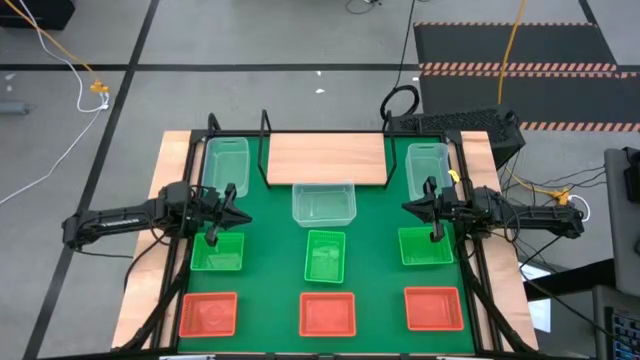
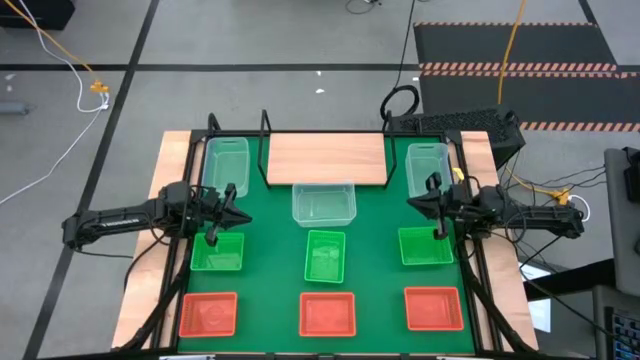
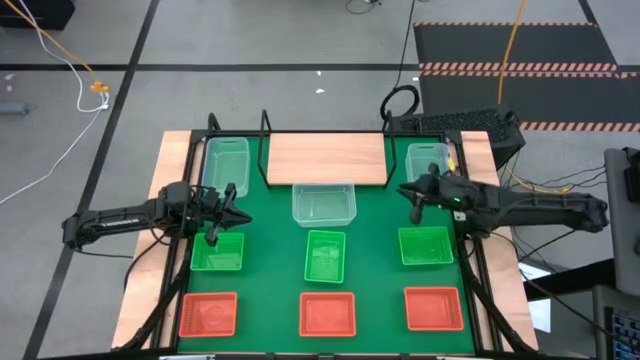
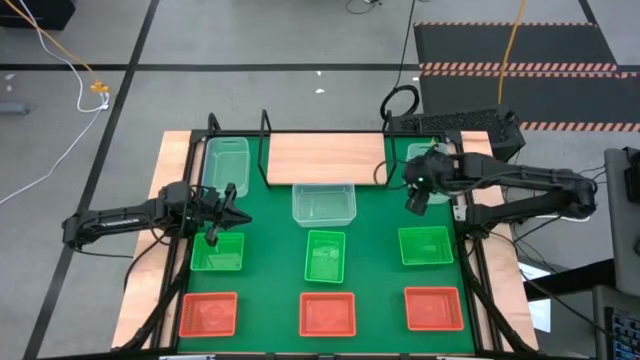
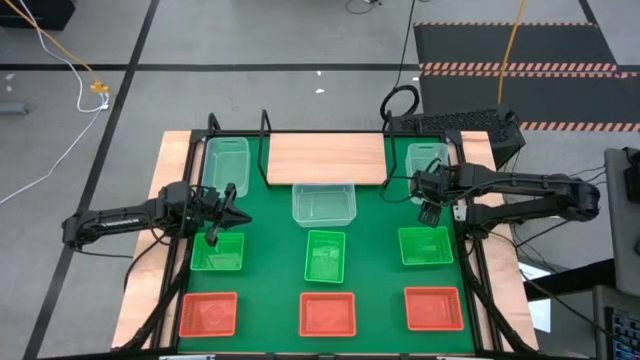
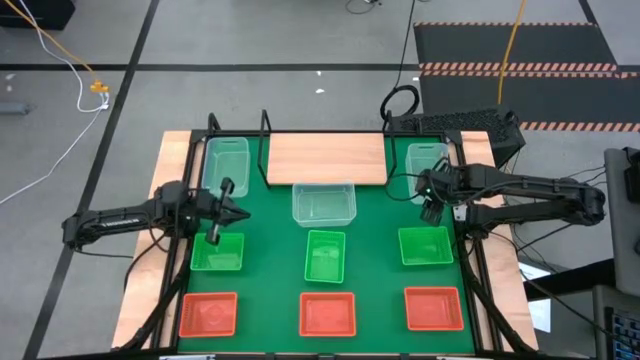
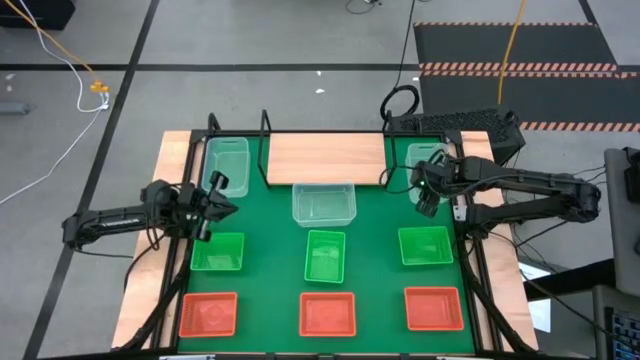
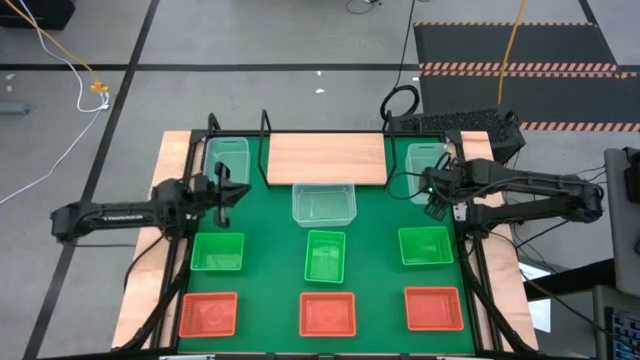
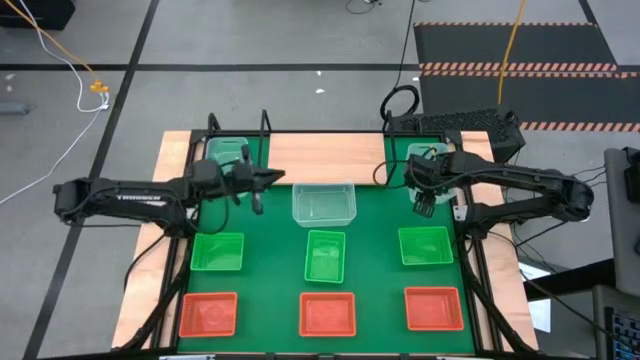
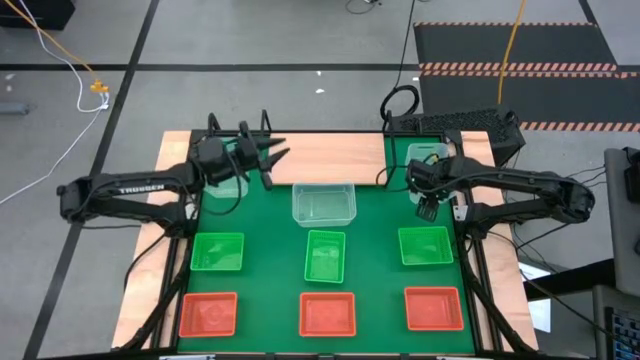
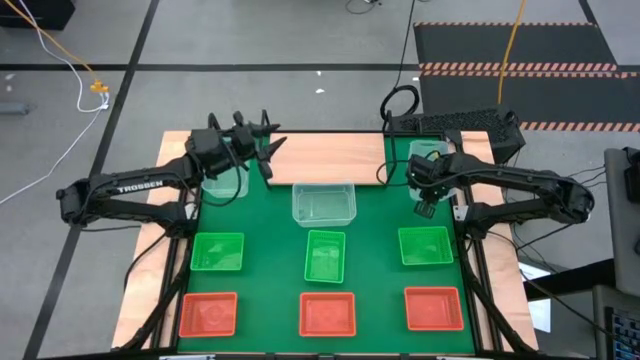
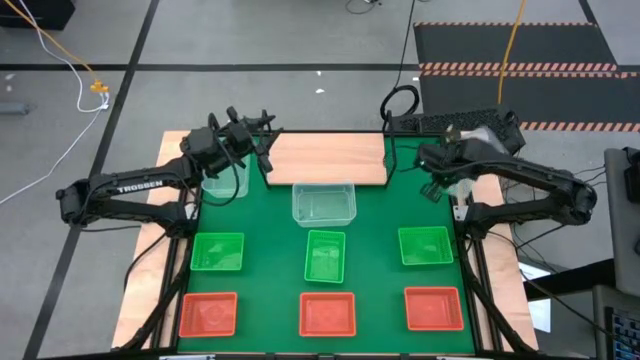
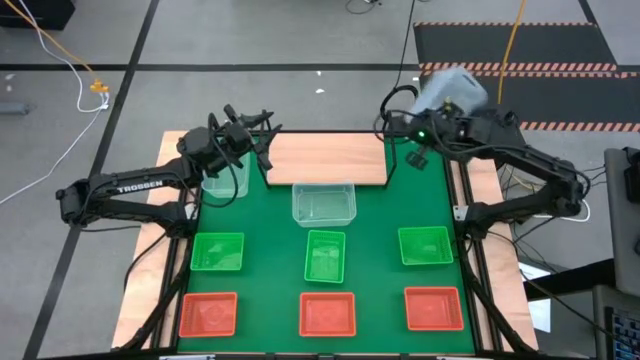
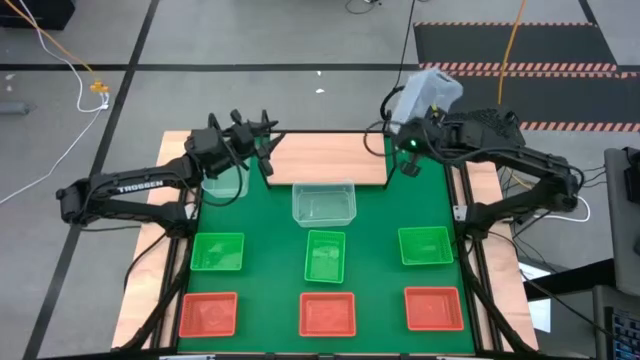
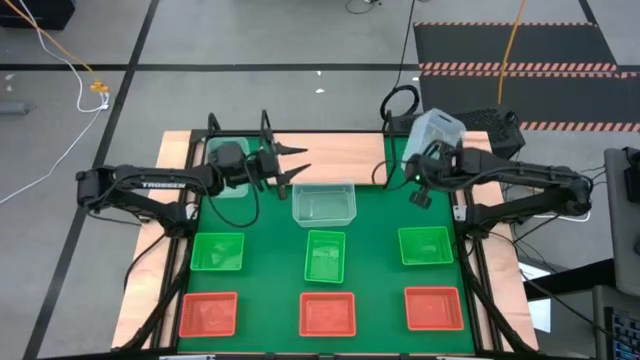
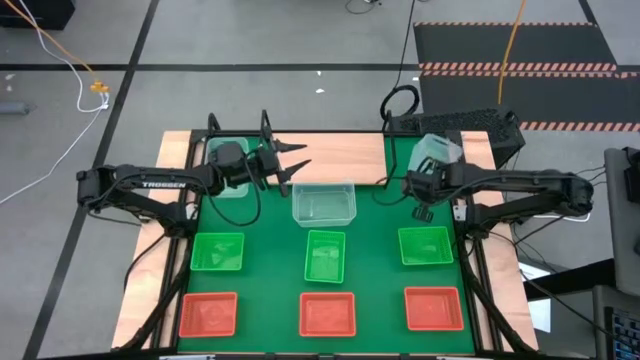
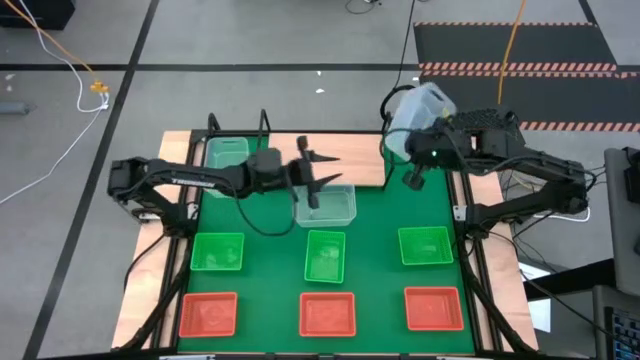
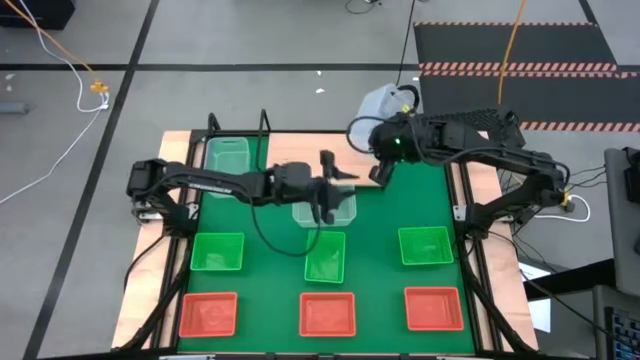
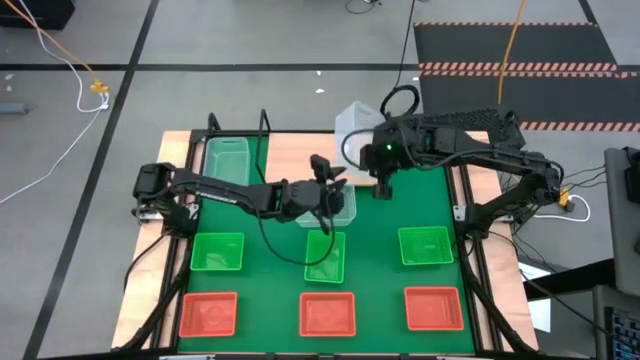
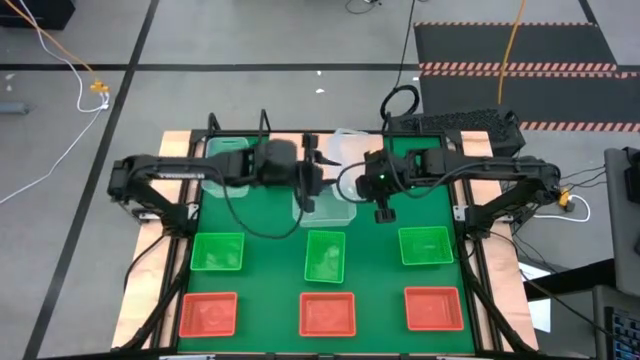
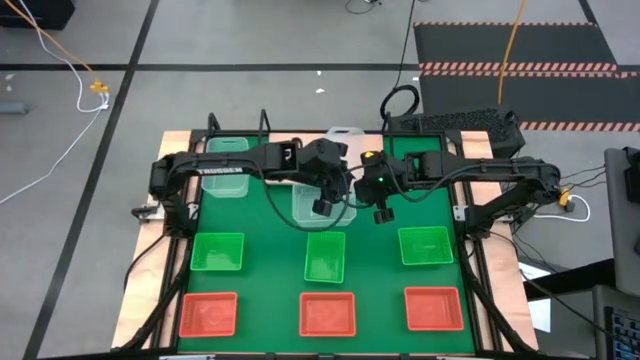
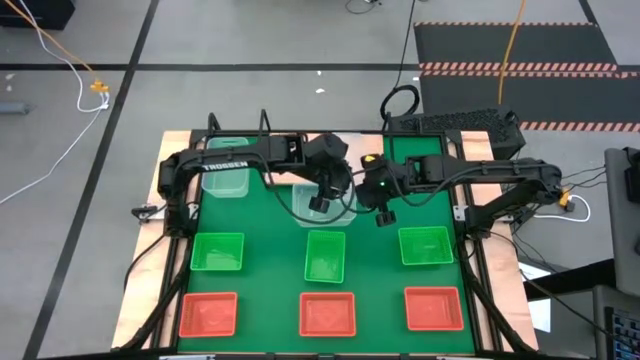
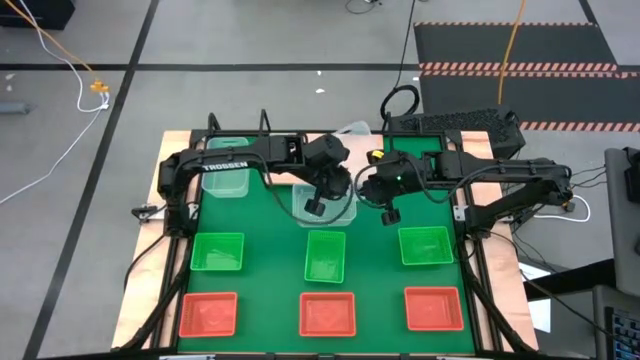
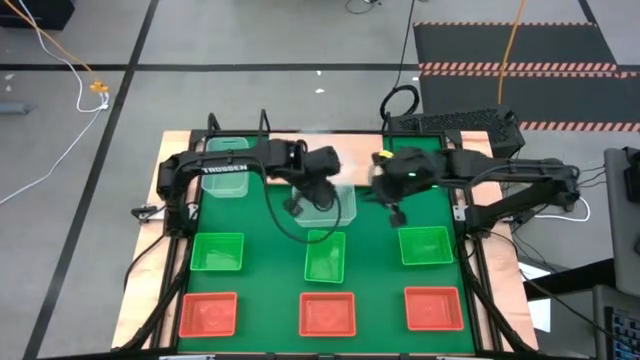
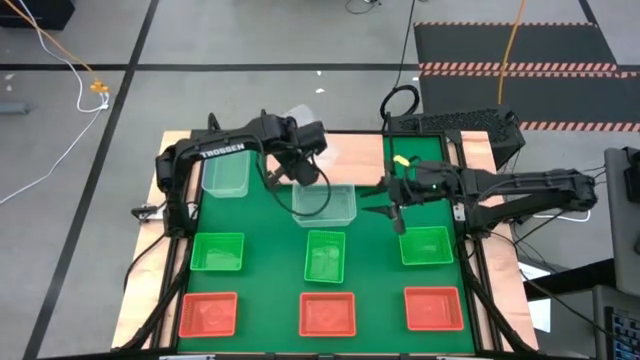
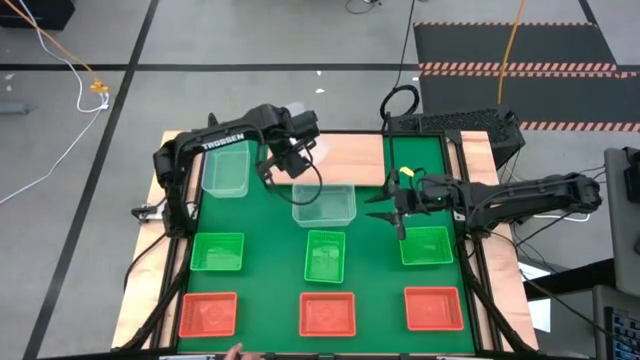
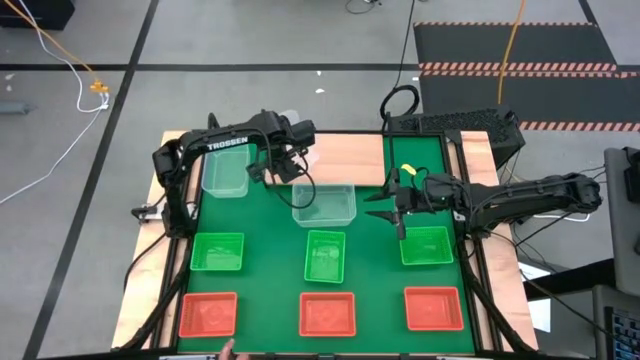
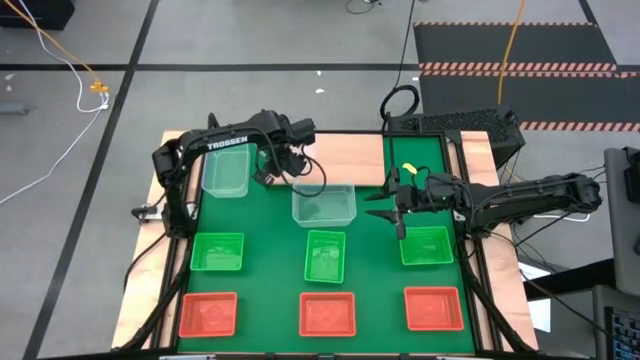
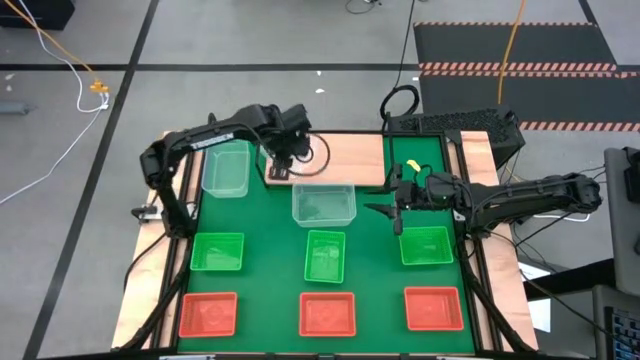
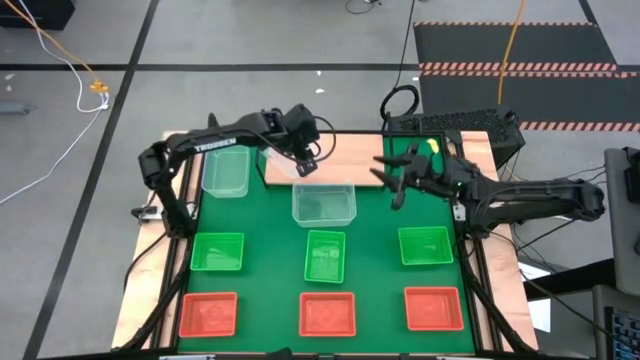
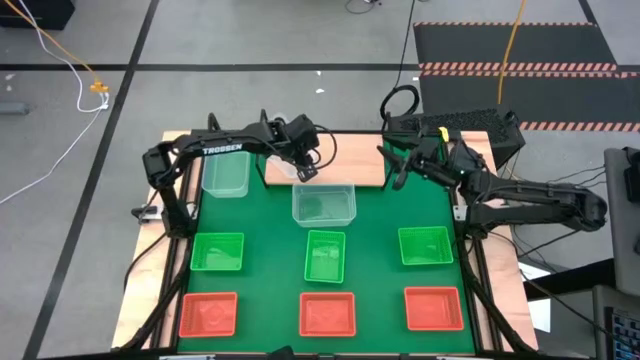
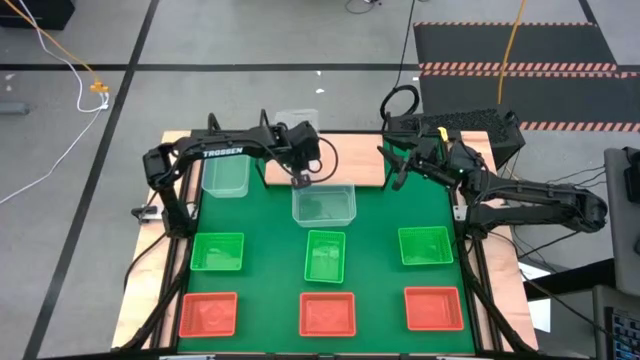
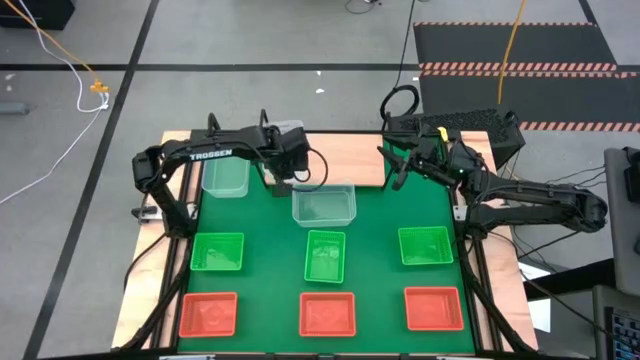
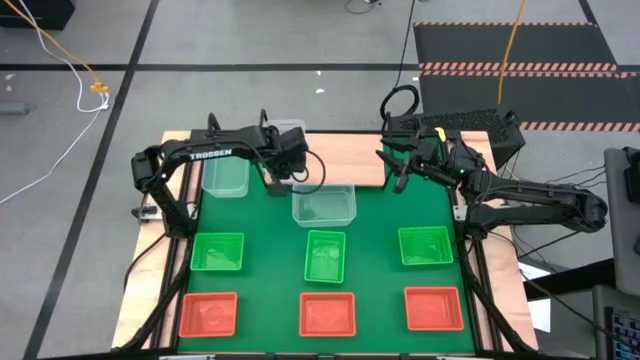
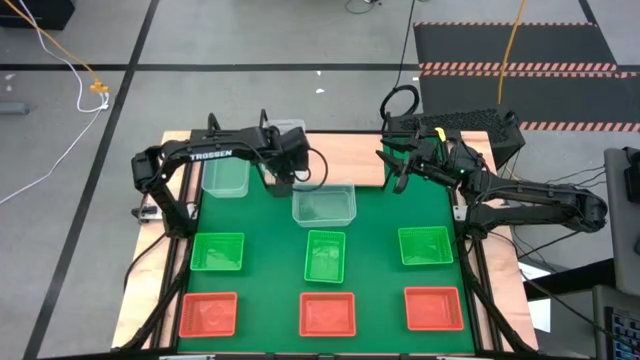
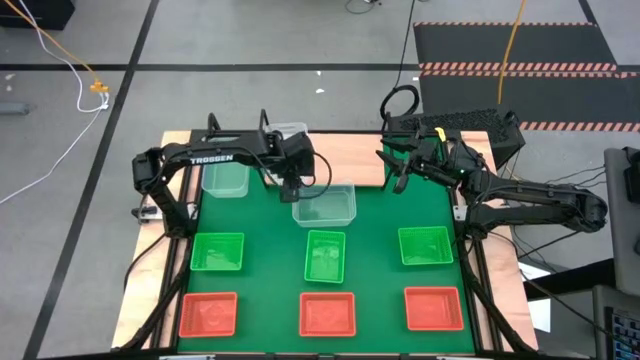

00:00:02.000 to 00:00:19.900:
Task: Stack baskets on shelf by color
Put the top right transparent bin on the shelf
